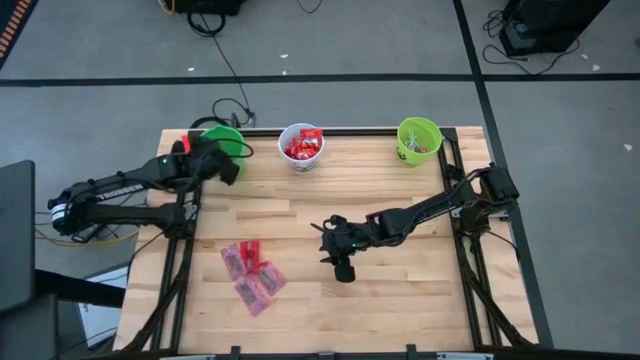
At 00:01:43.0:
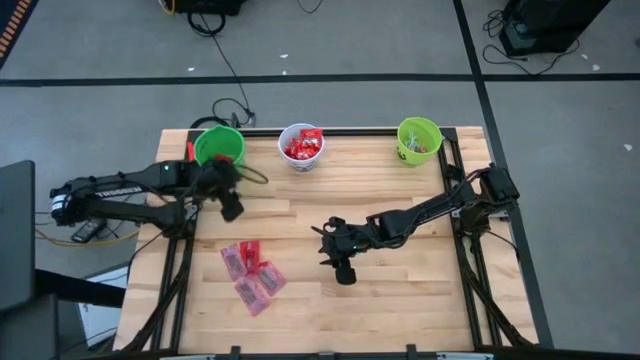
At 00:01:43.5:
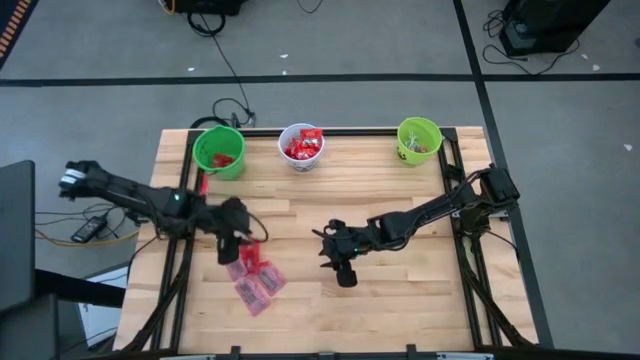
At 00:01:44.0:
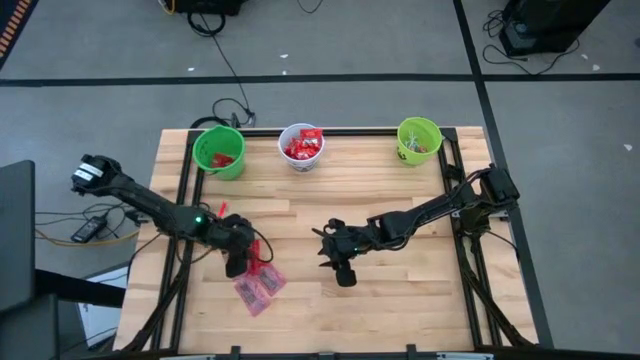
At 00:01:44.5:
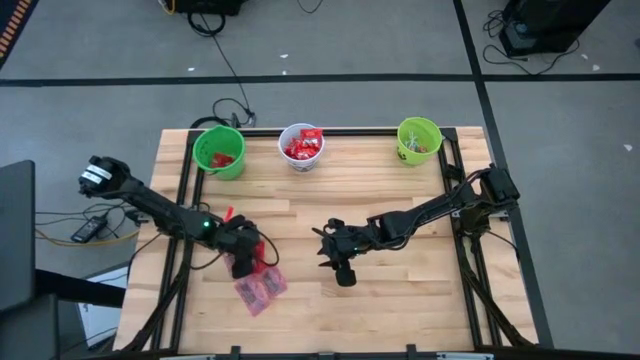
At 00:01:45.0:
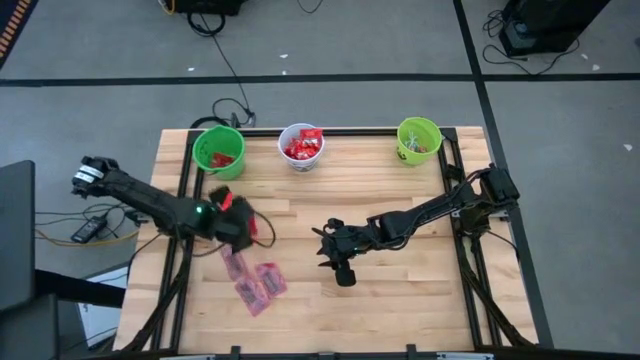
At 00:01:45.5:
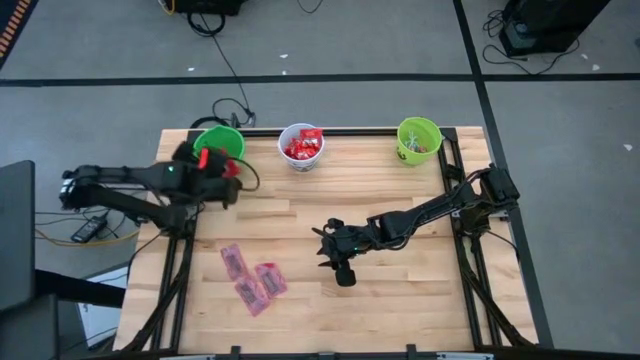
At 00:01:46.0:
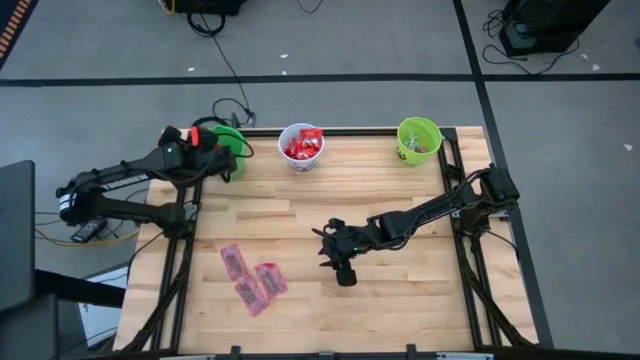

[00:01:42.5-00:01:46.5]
Task: Sort candy by brand, put in halloween buckets
Put the pink candy into the green bucket

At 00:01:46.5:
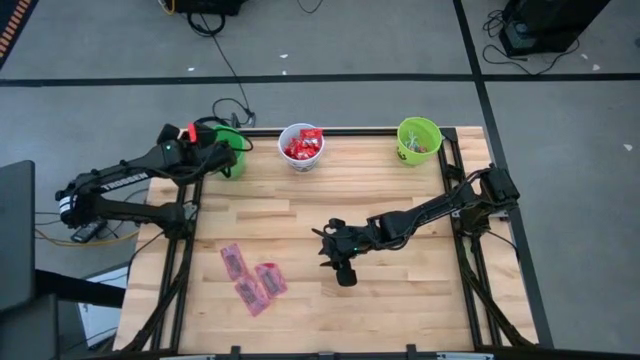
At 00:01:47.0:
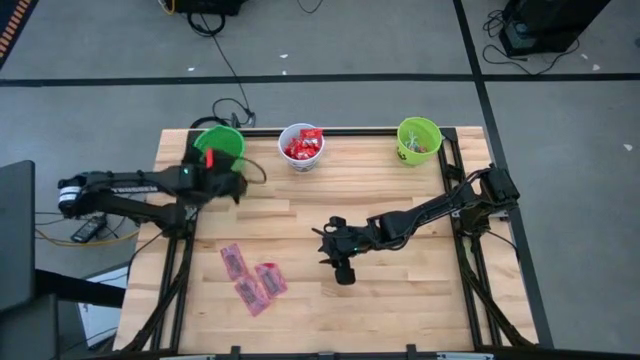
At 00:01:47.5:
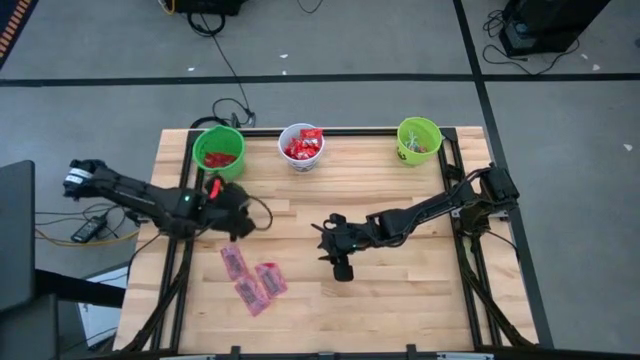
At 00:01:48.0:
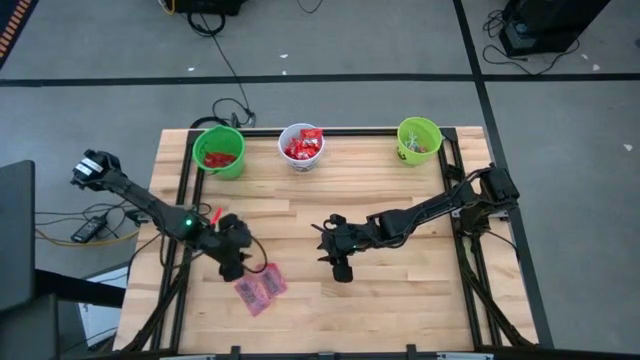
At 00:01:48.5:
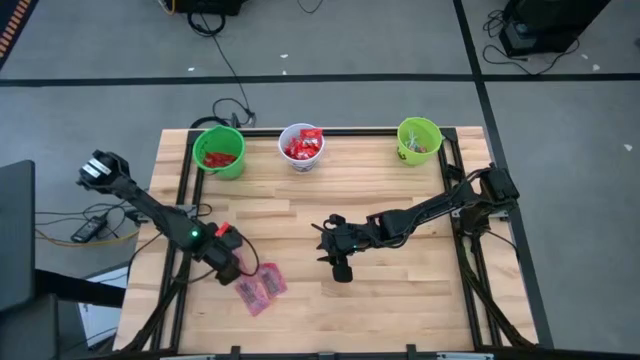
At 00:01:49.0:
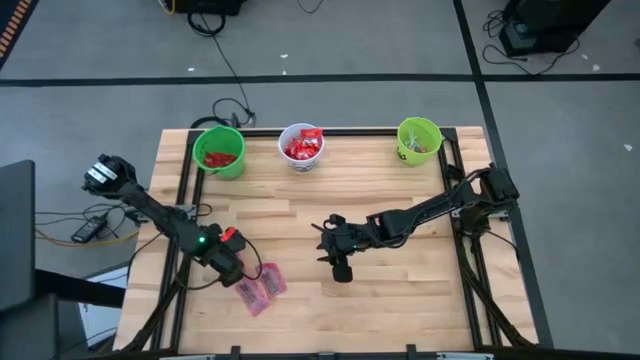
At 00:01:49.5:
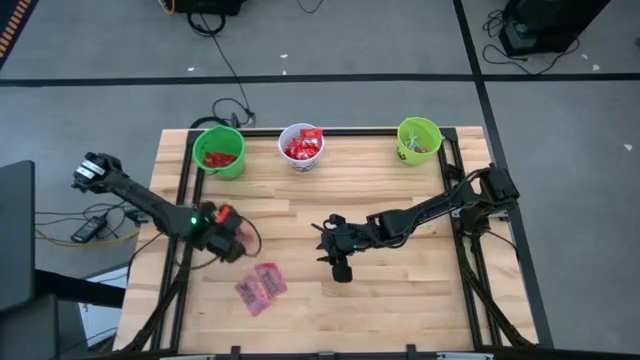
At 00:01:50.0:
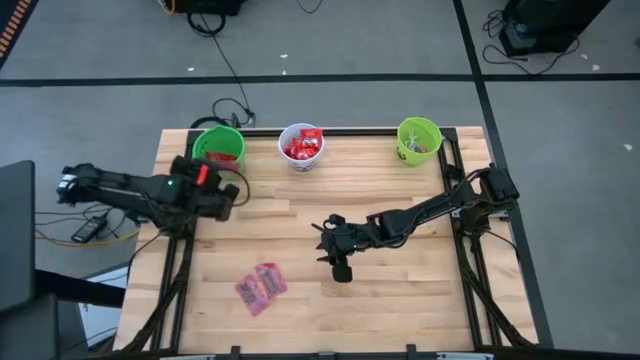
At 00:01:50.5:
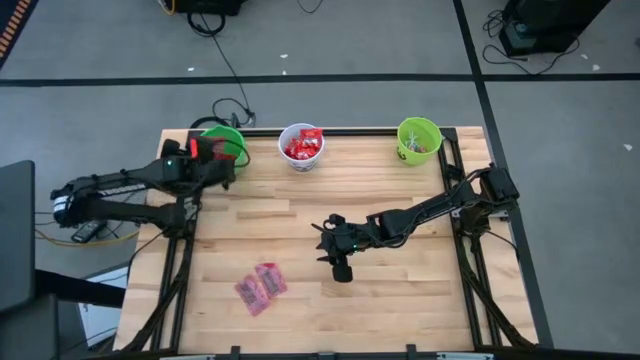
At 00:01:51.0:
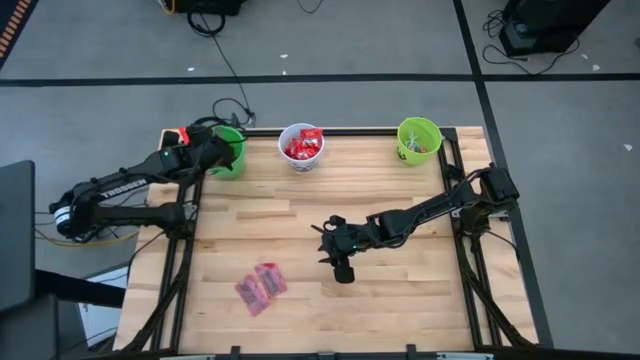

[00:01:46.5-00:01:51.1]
Put the pink candy into the green bucket

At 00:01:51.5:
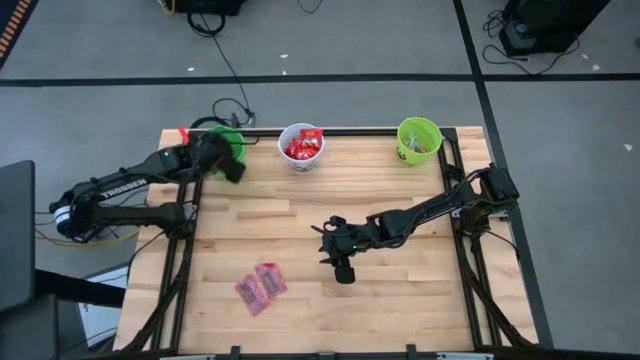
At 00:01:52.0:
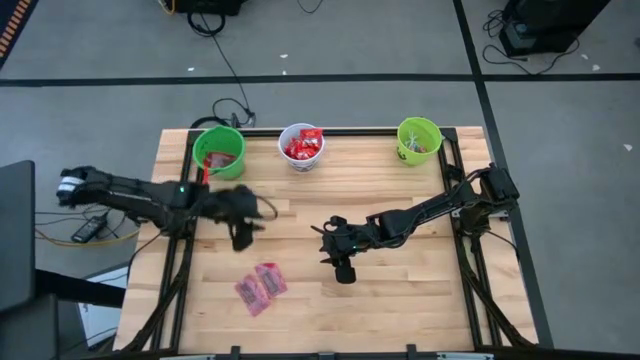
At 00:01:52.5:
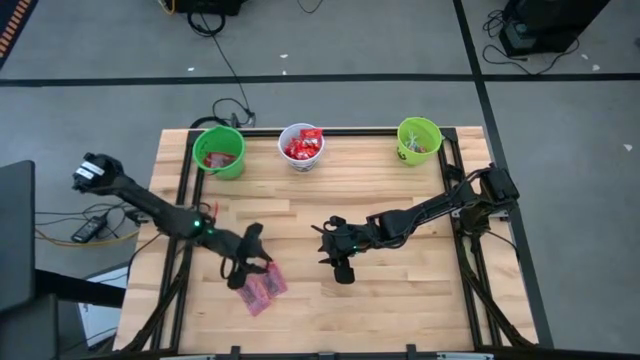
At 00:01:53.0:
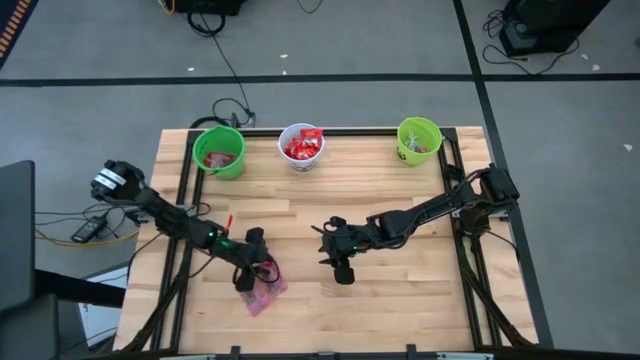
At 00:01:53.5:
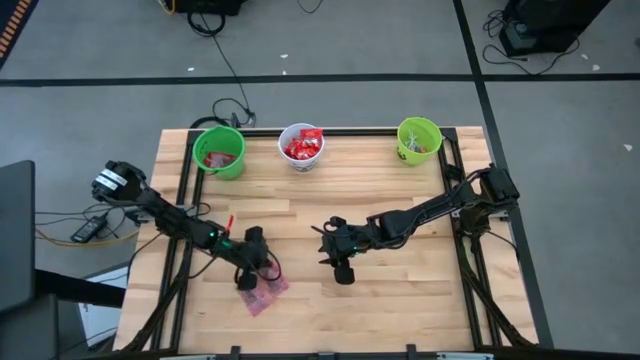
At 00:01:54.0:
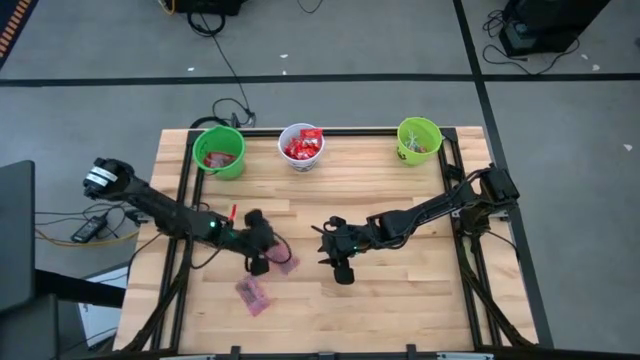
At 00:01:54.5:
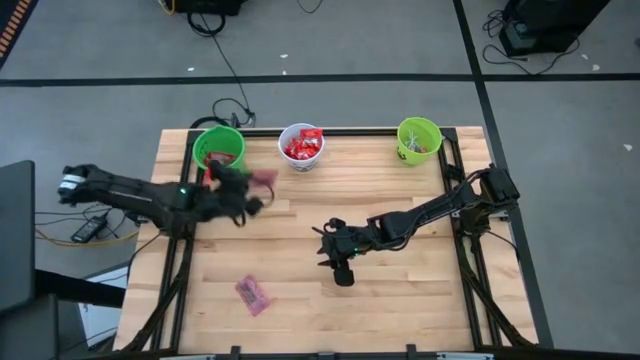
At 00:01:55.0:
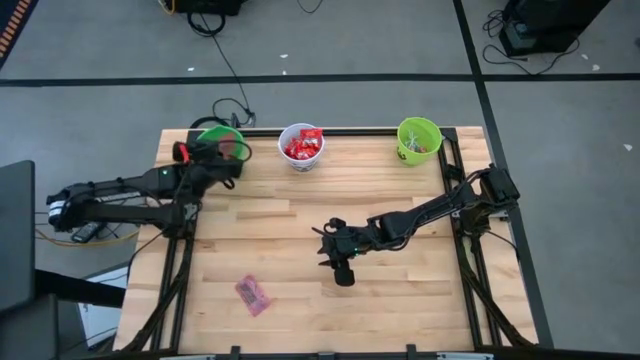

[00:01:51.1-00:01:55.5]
Put the pink candy into the green bucket

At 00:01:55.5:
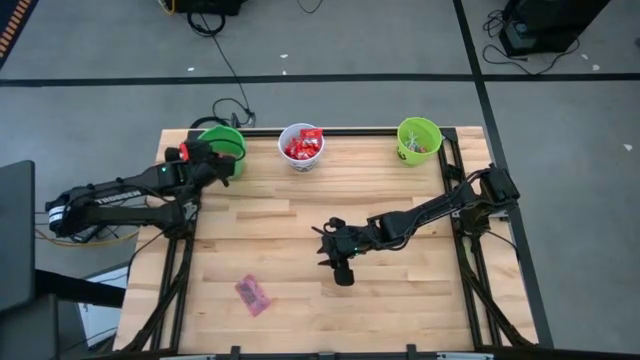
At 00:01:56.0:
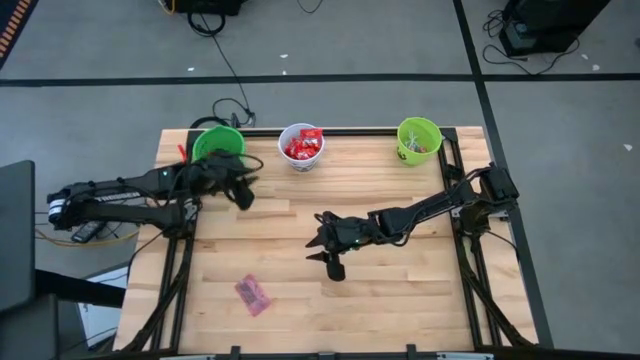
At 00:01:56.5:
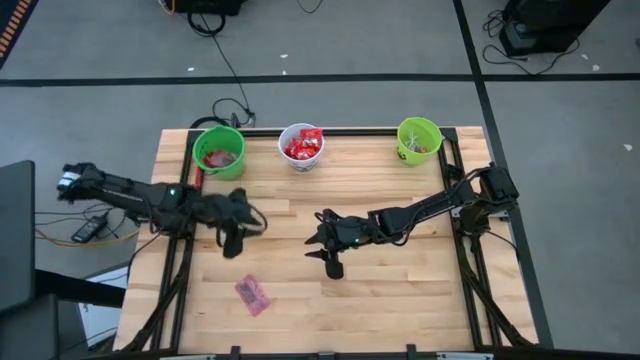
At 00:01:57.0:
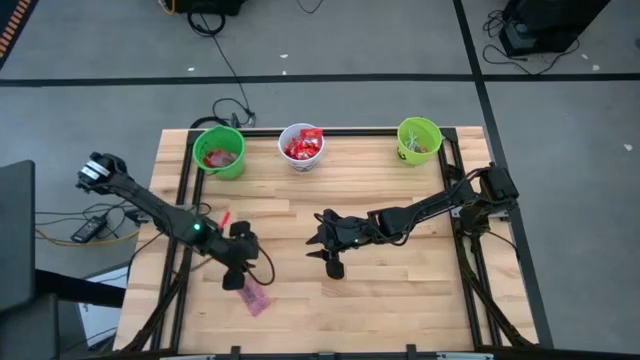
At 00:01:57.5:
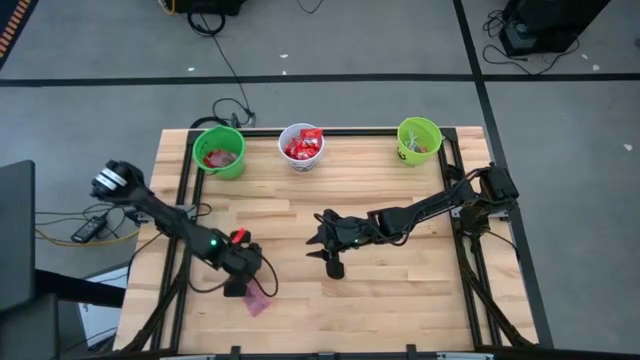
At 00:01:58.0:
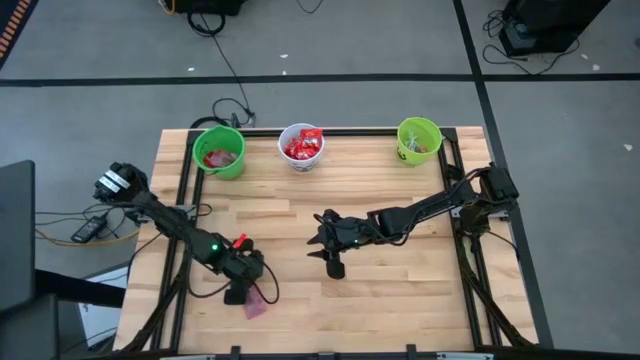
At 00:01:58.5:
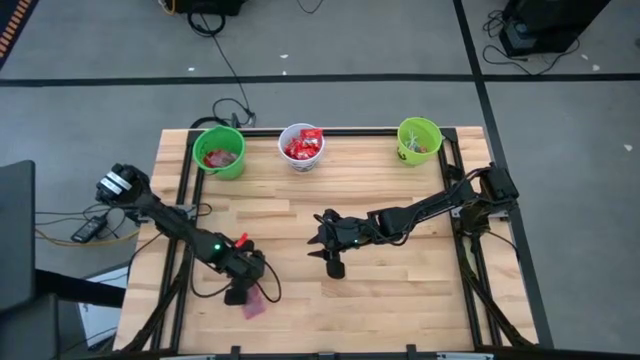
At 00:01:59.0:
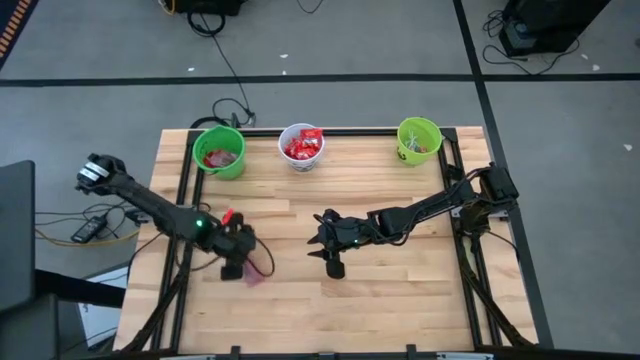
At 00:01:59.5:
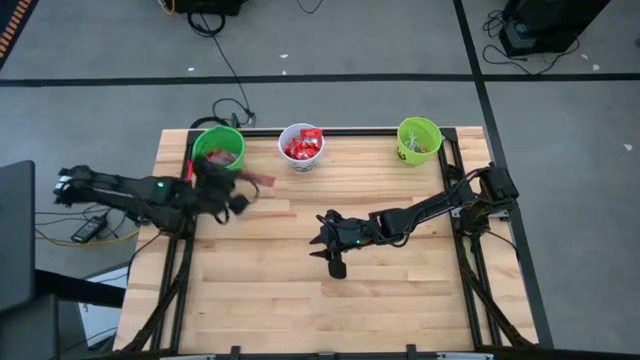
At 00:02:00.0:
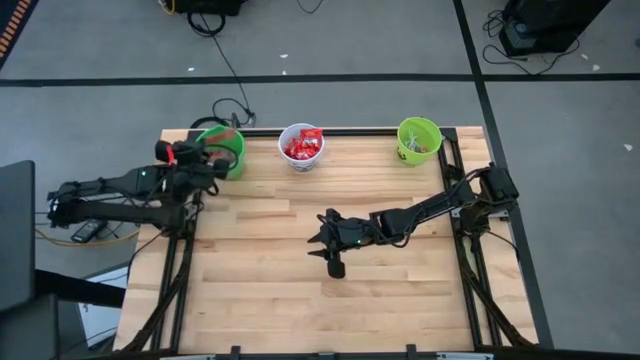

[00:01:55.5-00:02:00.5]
Put the pink candy into the green bucket

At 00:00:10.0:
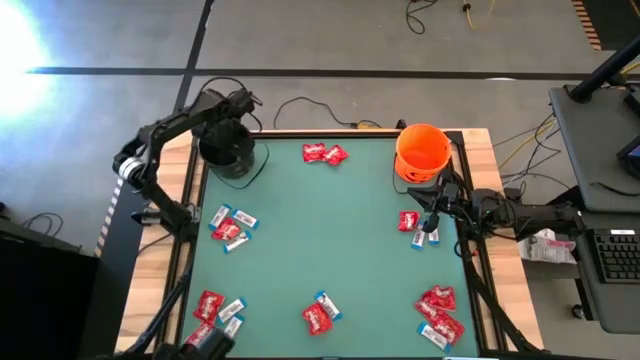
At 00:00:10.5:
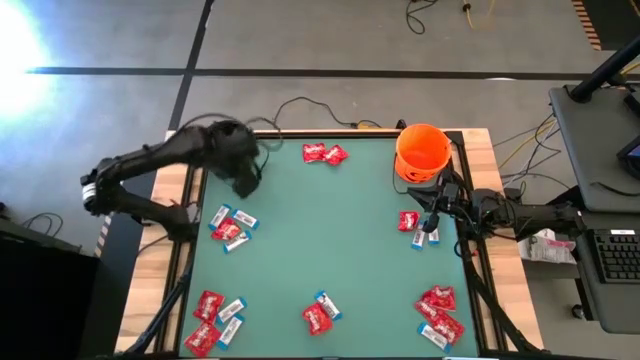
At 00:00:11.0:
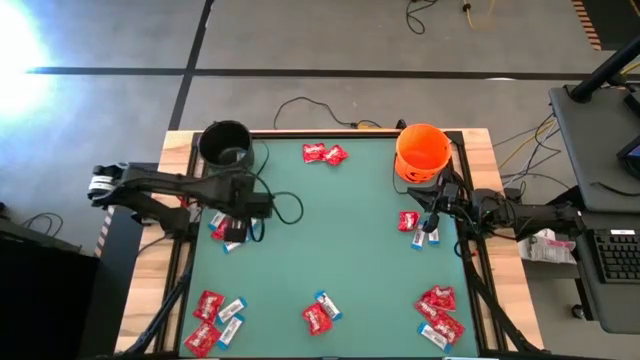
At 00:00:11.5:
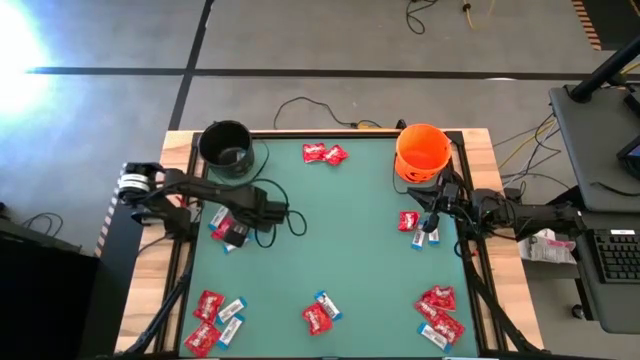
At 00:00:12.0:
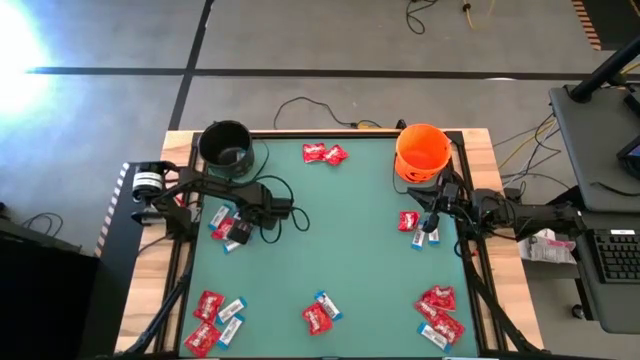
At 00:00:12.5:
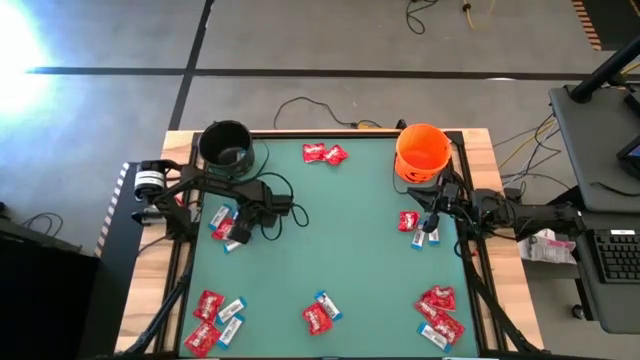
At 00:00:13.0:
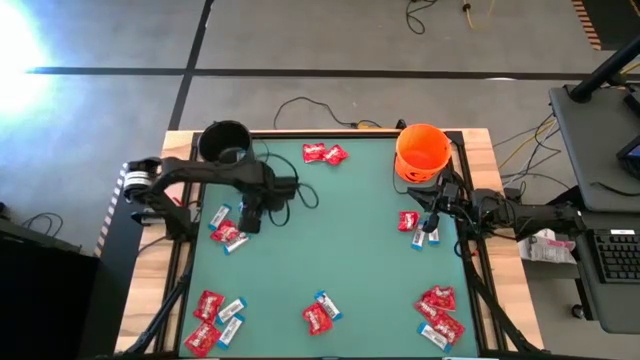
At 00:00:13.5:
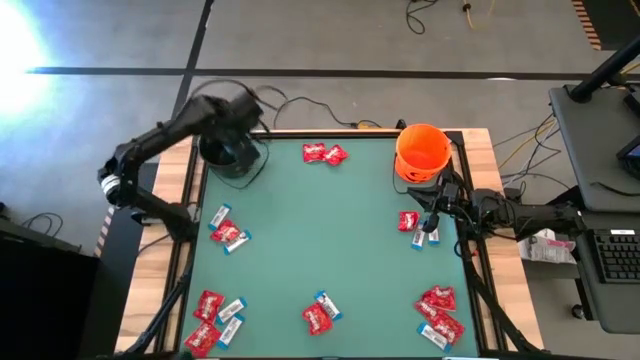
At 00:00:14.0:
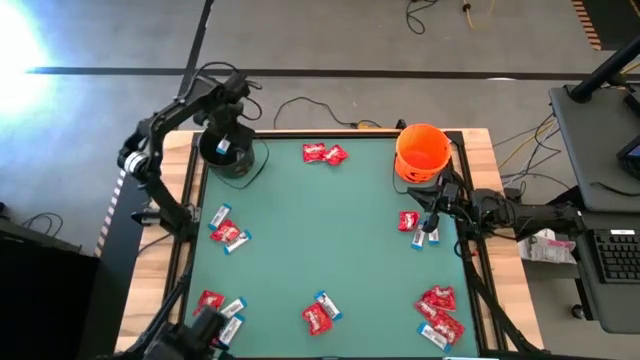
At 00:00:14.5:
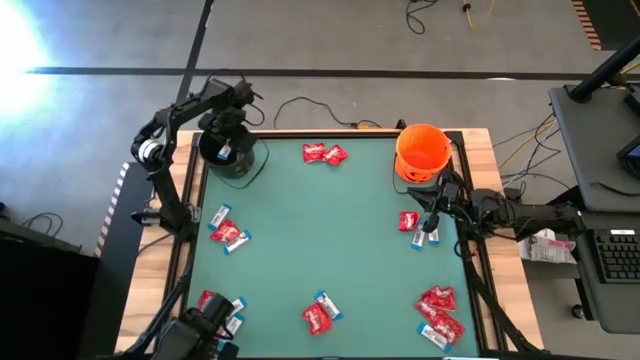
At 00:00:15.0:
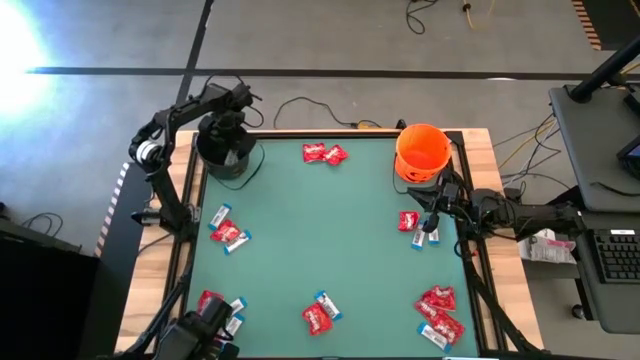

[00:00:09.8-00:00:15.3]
Task: Sort candy by brand, put in halloween buckets
Put the white chocolate into the black bucket
